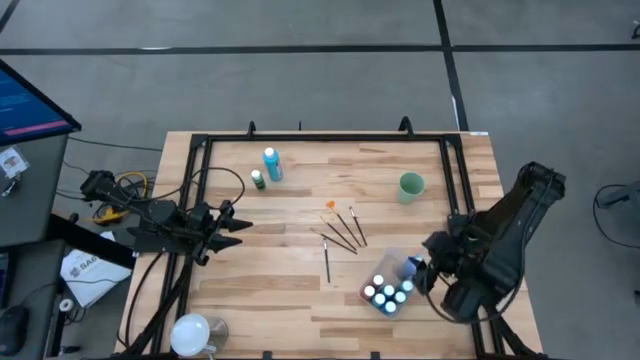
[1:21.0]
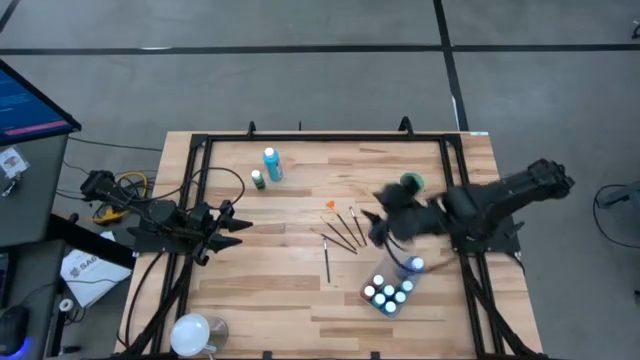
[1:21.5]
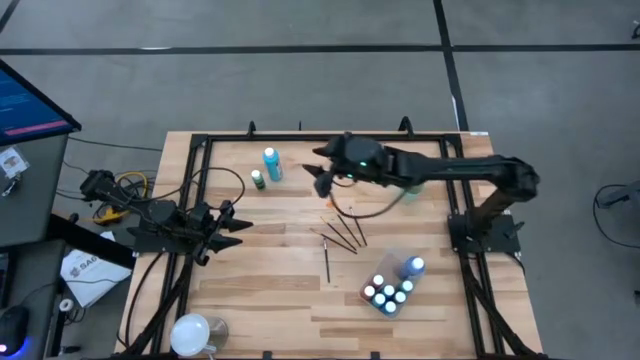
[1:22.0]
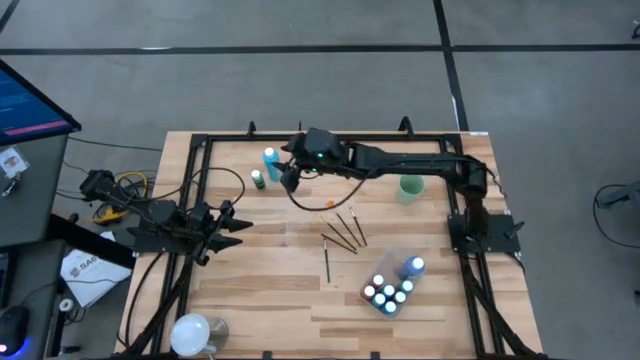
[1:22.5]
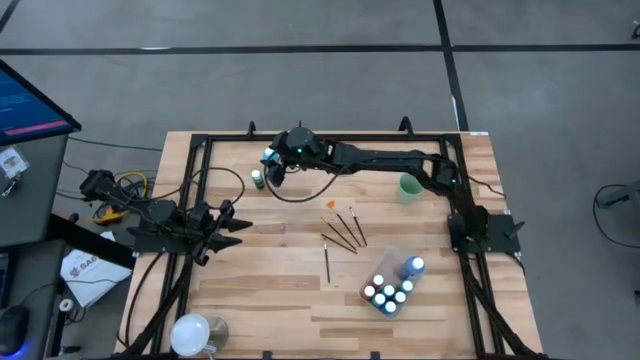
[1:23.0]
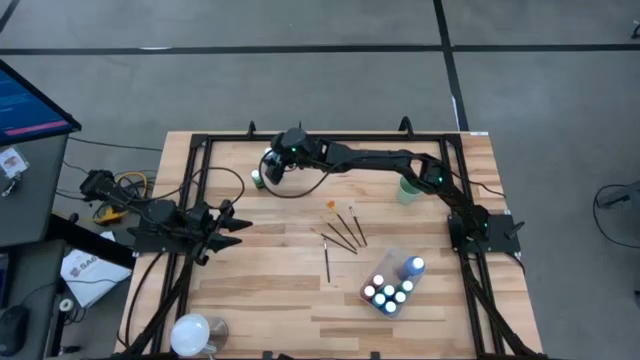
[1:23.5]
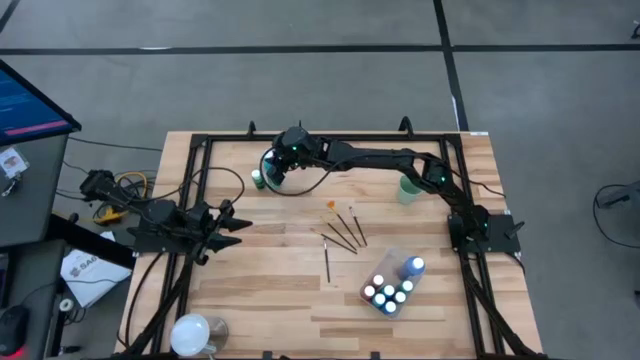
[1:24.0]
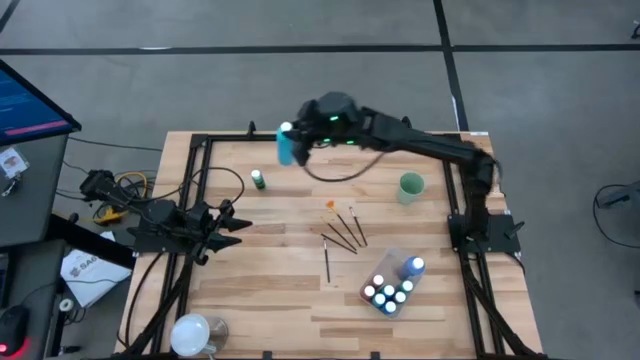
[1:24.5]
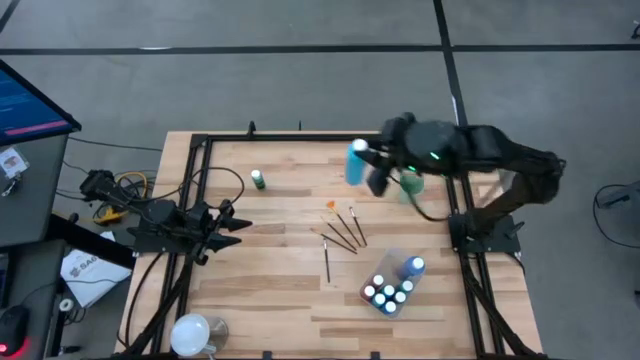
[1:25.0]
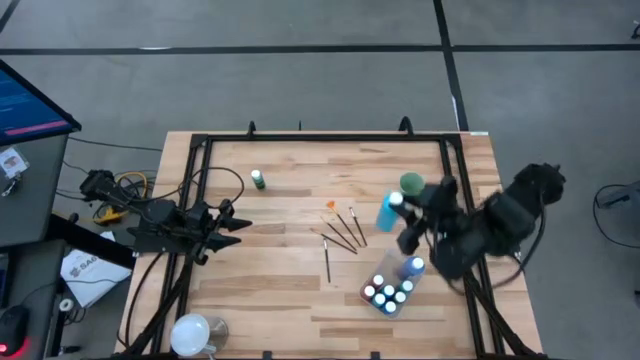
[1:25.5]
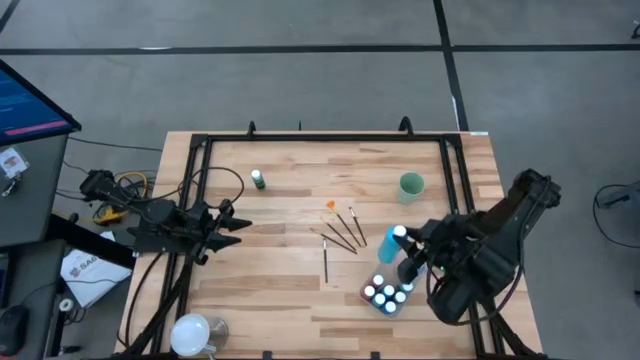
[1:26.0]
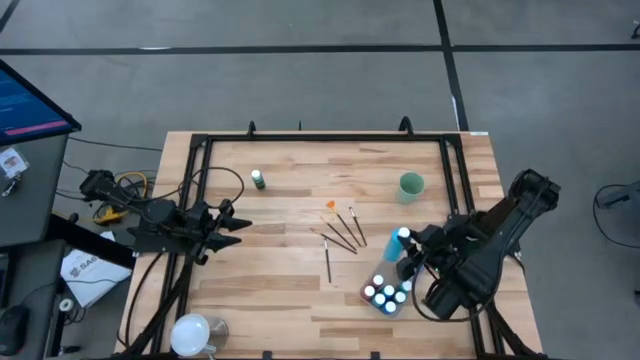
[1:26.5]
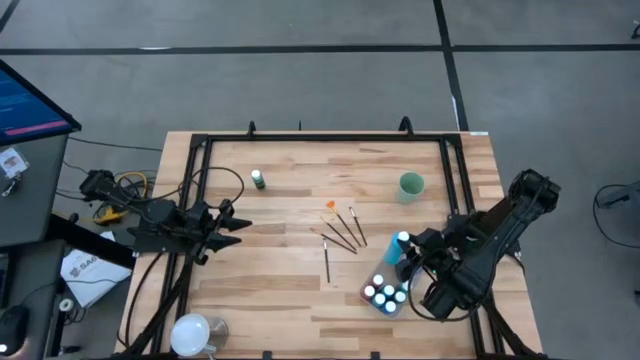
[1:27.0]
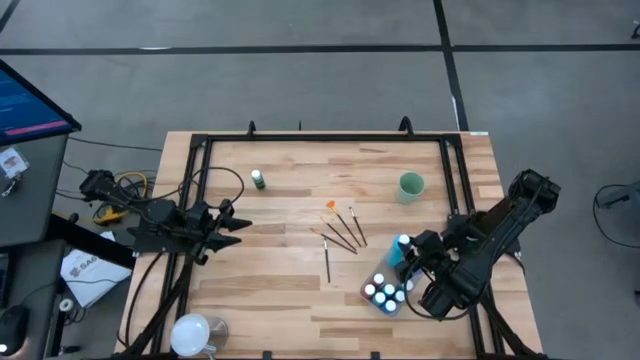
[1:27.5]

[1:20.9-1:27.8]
Task: Pick & Place Paint Supplies
Put the light blue paint bottle into the transparent bin

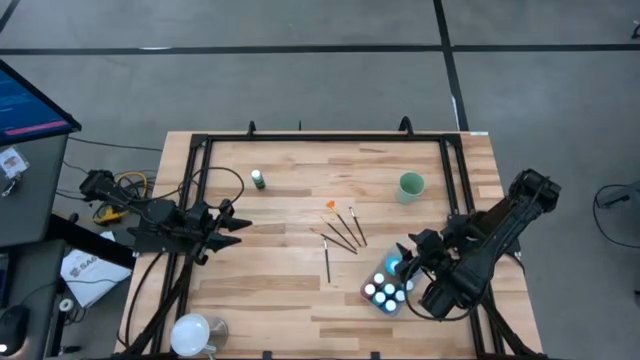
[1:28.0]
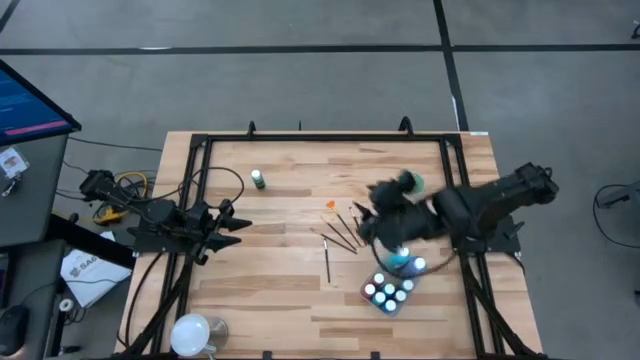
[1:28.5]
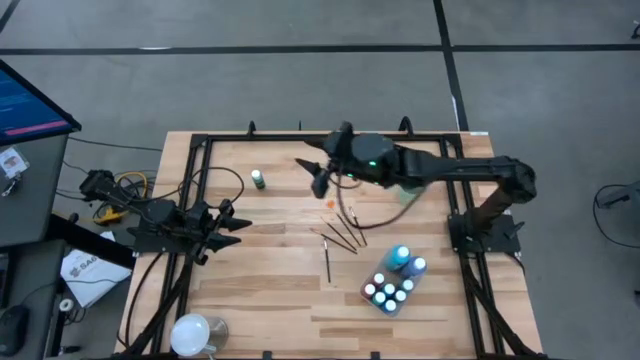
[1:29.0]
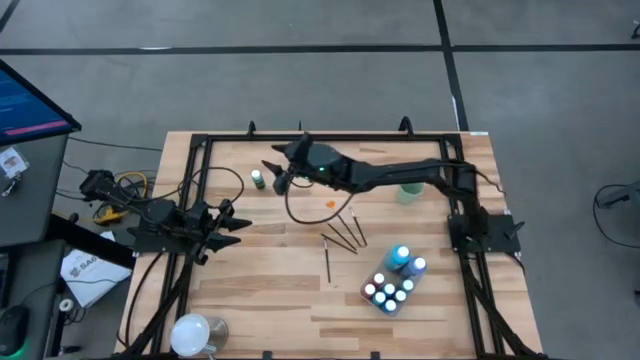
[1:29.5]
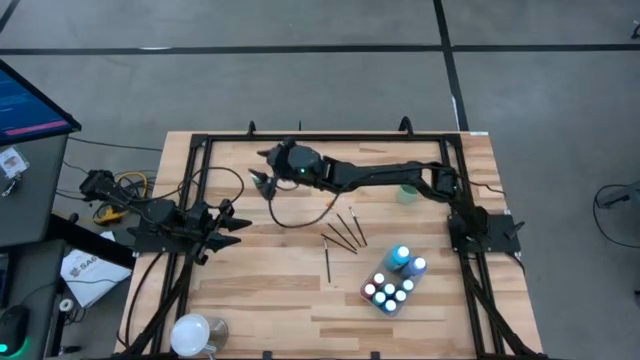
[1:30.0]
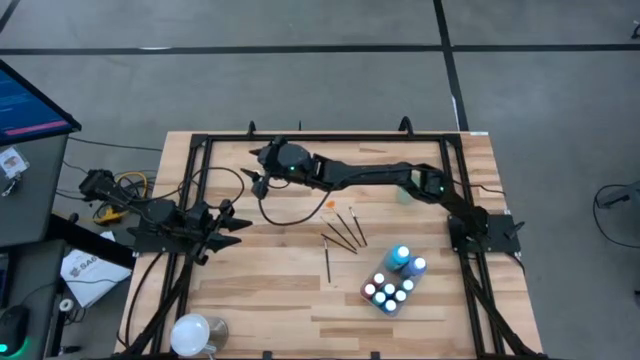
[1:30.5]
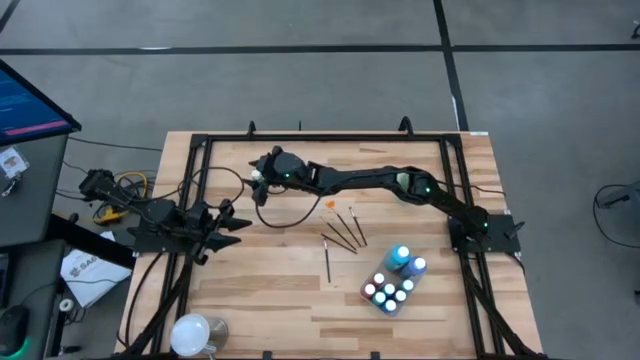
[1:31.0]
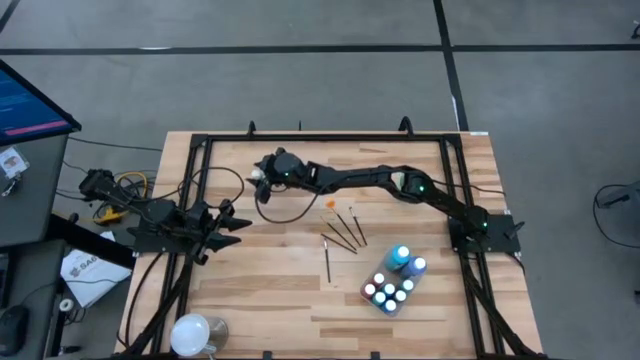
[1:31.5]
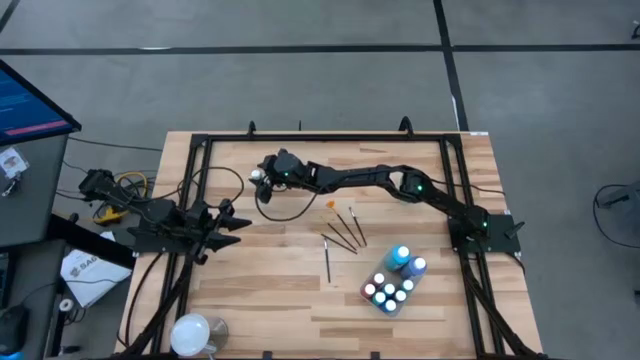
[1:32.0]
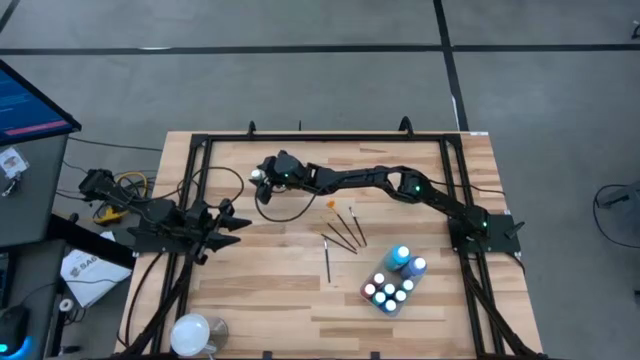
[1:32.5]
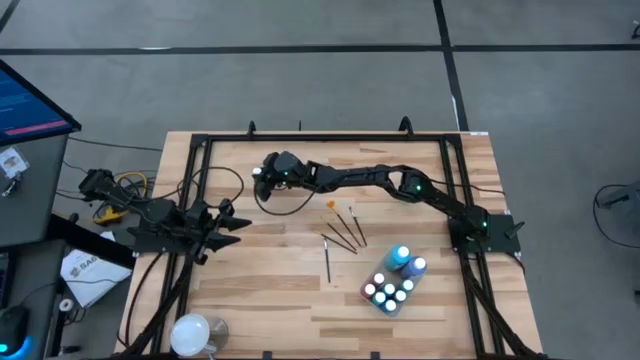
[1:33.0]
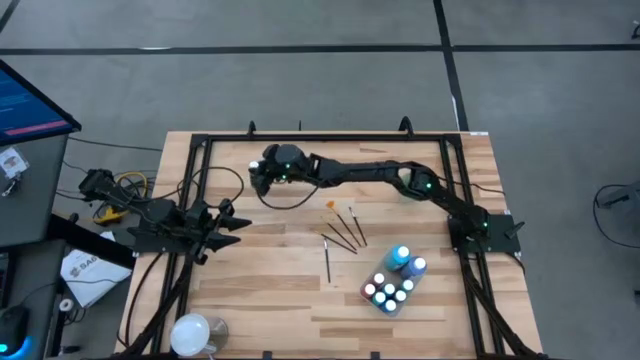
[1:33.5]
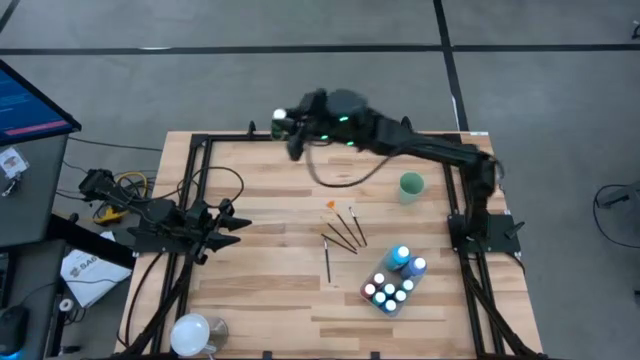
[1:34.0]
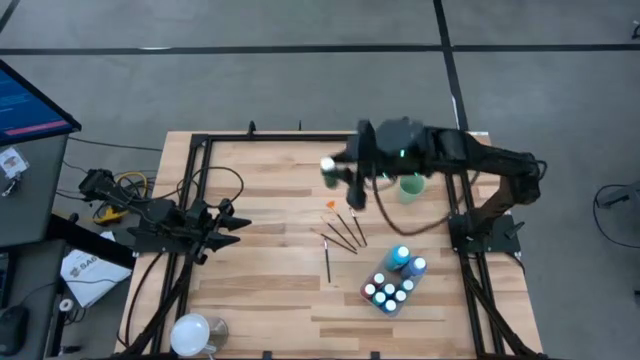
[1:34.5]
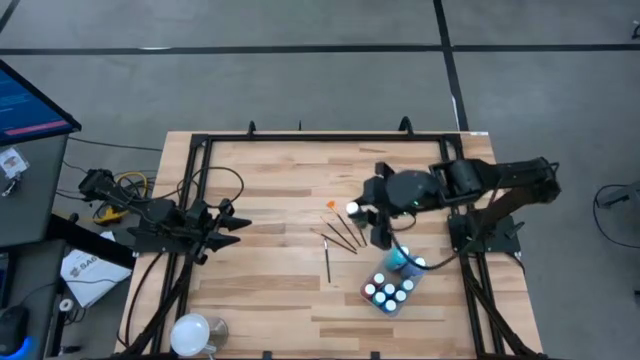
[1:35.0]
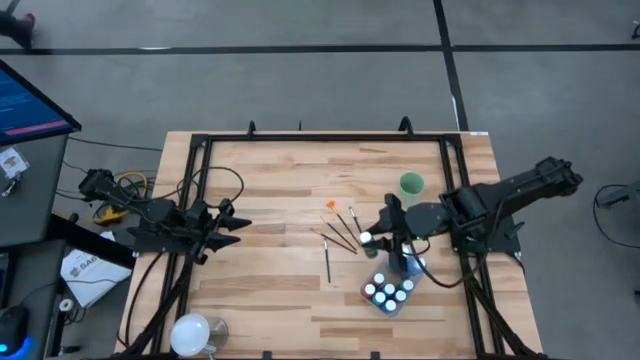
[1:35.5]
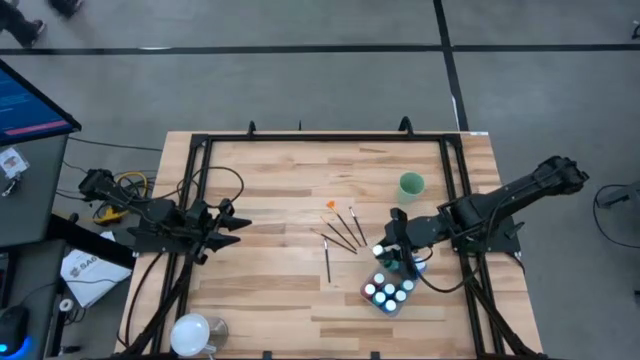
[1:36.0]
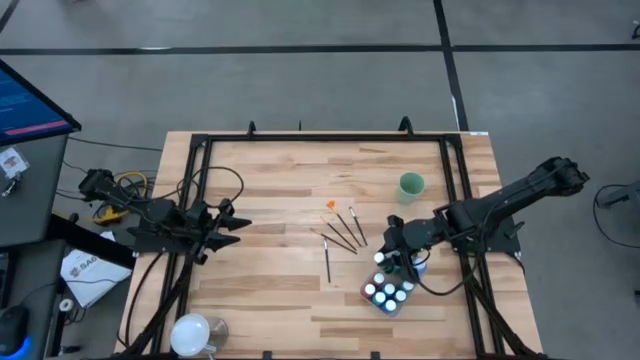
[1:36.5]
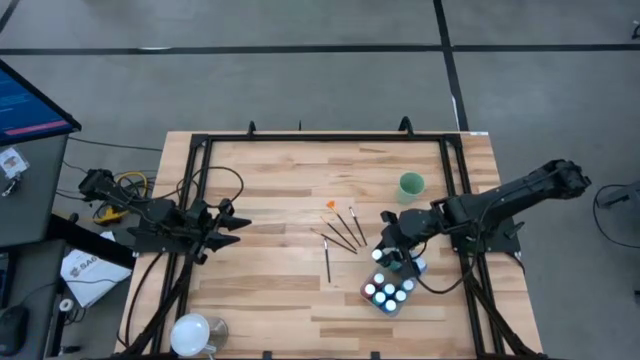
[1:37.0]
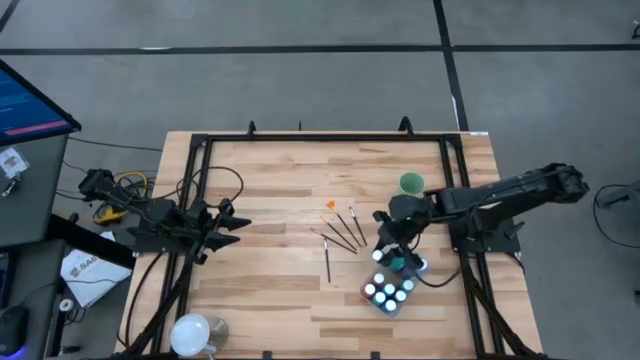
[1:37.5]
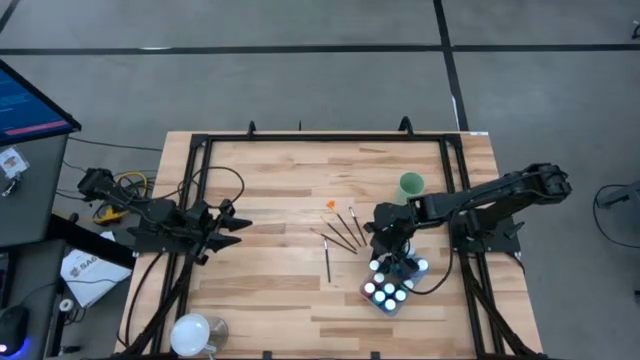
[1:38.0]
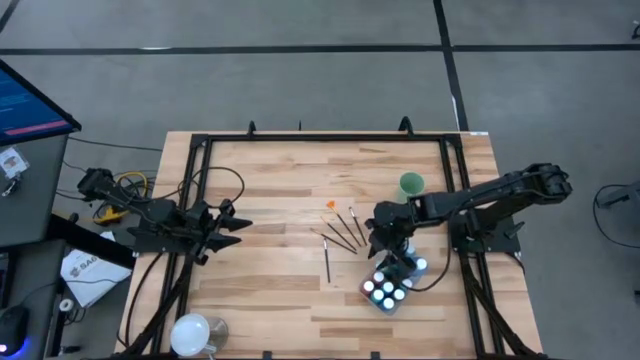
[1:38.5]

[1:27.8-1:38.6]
Put the green paint bottle into the transparent bin
